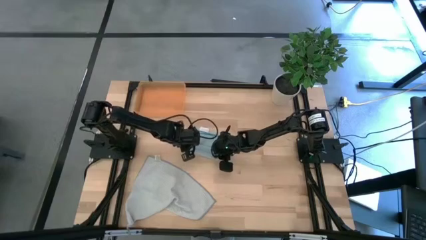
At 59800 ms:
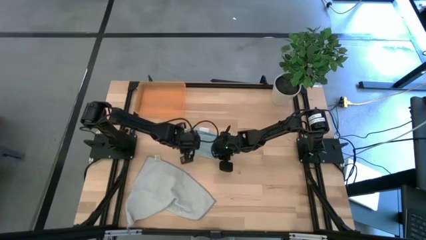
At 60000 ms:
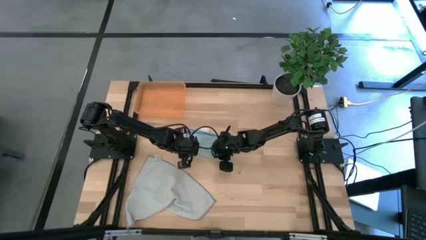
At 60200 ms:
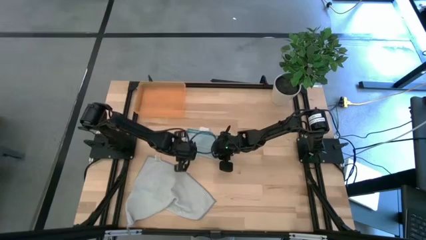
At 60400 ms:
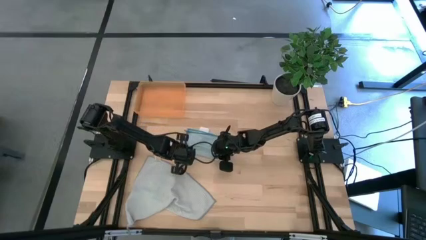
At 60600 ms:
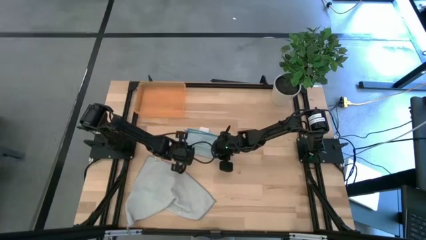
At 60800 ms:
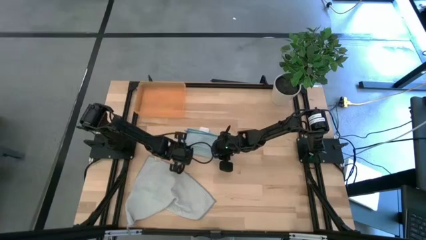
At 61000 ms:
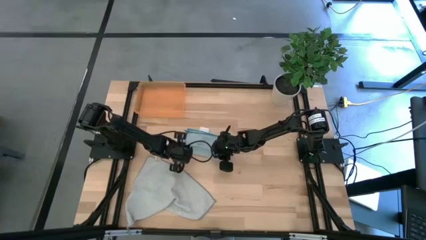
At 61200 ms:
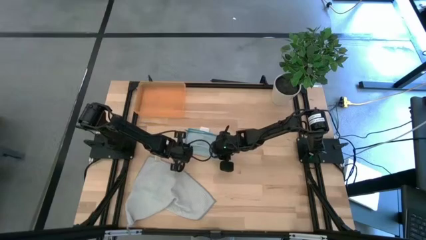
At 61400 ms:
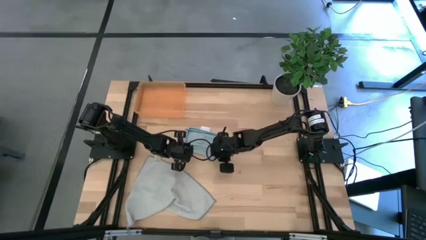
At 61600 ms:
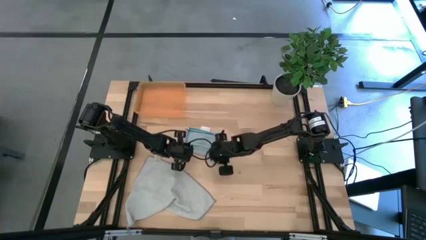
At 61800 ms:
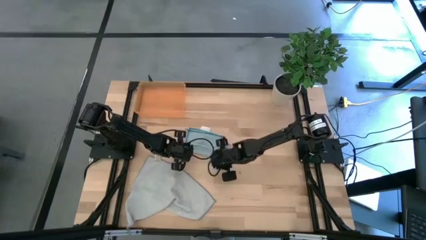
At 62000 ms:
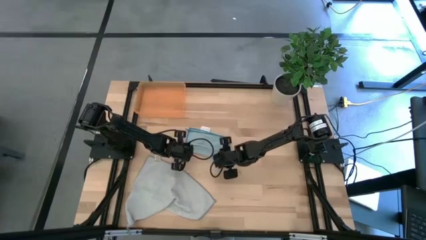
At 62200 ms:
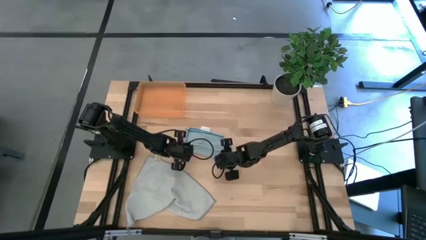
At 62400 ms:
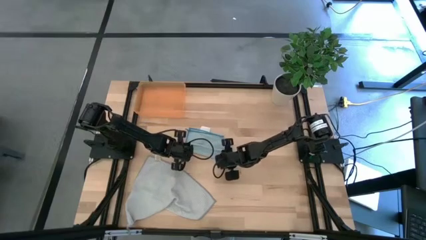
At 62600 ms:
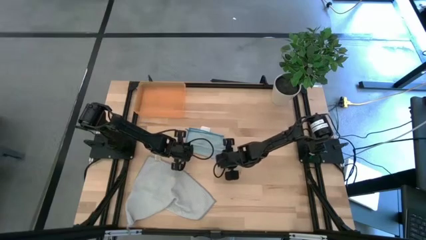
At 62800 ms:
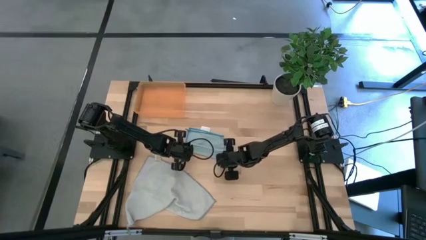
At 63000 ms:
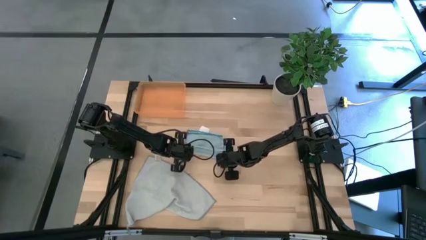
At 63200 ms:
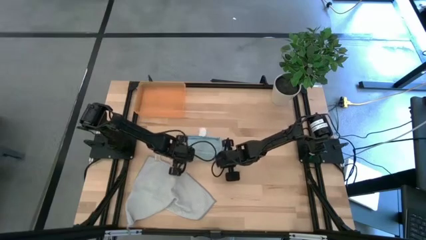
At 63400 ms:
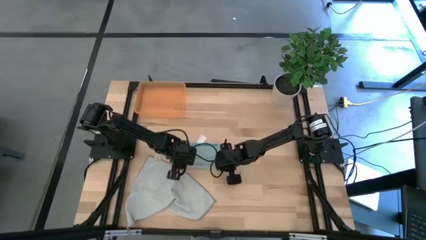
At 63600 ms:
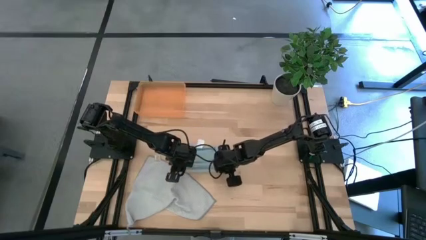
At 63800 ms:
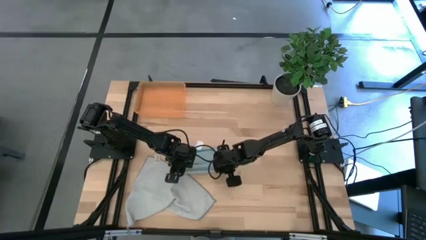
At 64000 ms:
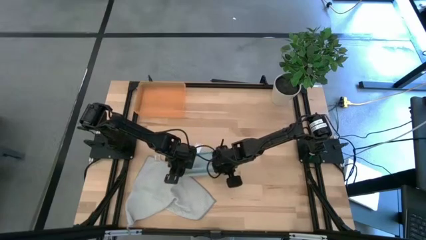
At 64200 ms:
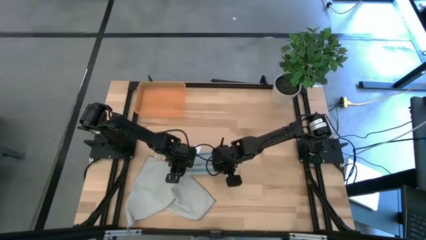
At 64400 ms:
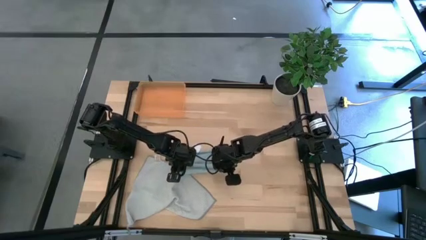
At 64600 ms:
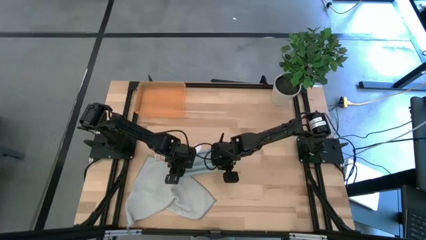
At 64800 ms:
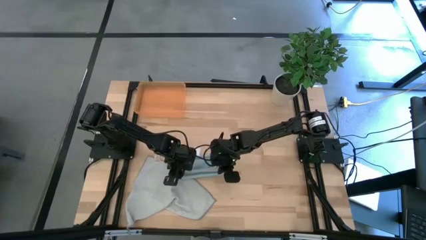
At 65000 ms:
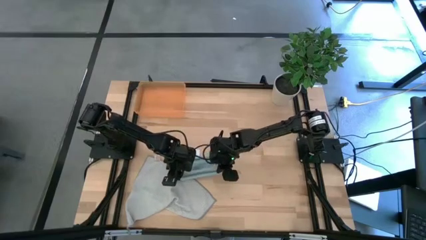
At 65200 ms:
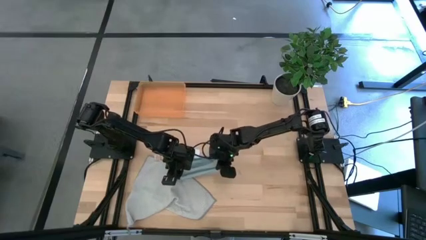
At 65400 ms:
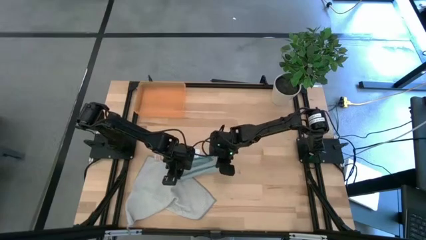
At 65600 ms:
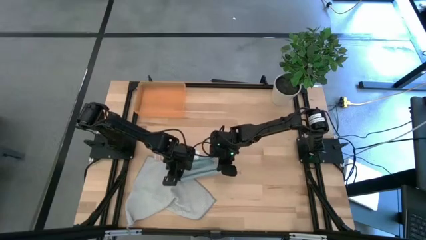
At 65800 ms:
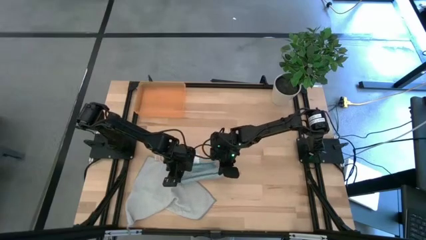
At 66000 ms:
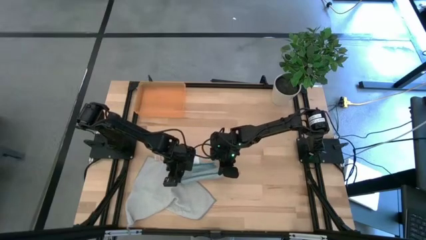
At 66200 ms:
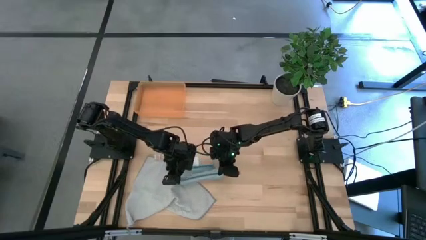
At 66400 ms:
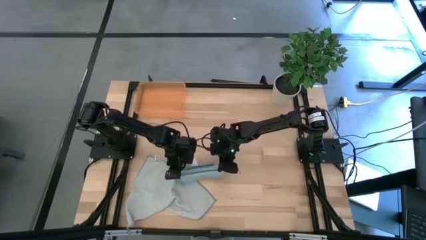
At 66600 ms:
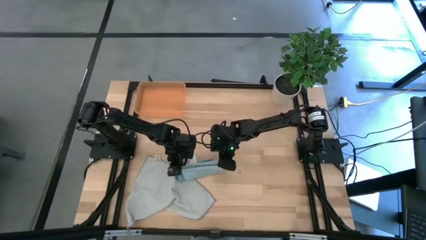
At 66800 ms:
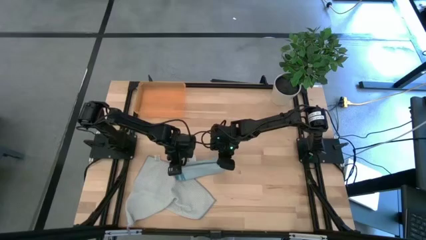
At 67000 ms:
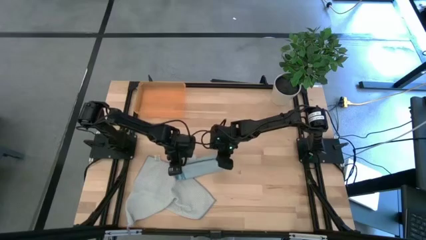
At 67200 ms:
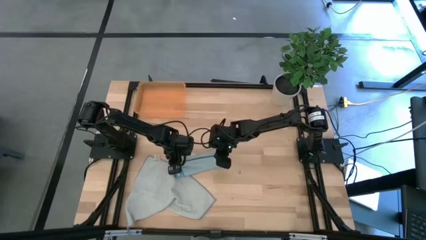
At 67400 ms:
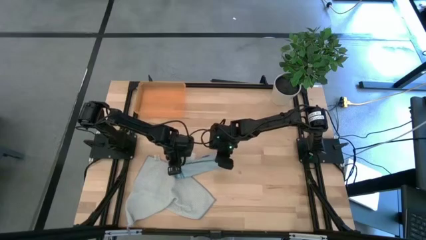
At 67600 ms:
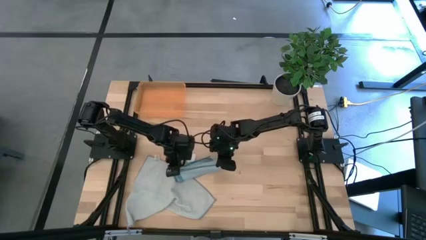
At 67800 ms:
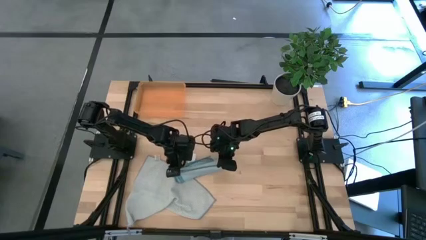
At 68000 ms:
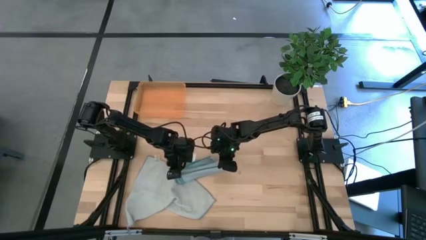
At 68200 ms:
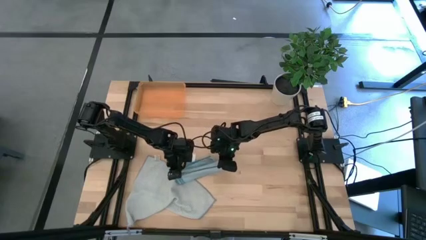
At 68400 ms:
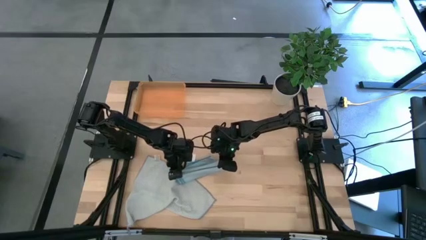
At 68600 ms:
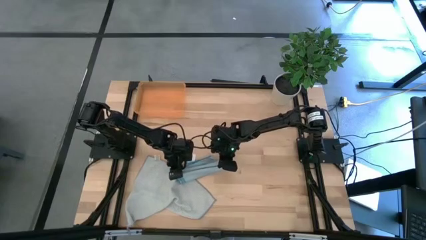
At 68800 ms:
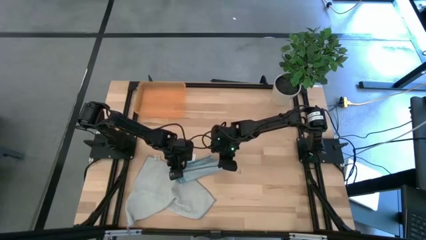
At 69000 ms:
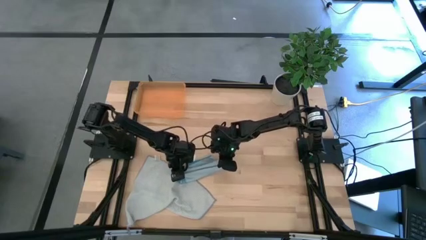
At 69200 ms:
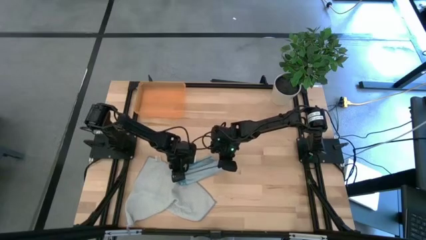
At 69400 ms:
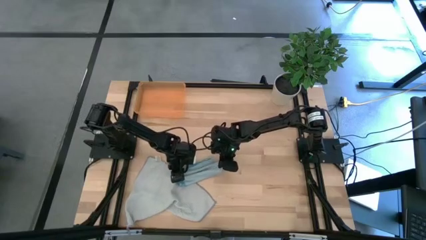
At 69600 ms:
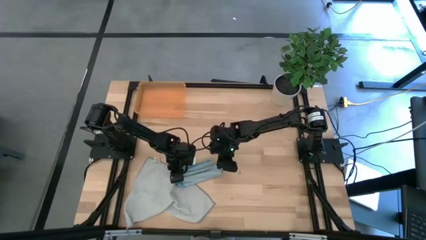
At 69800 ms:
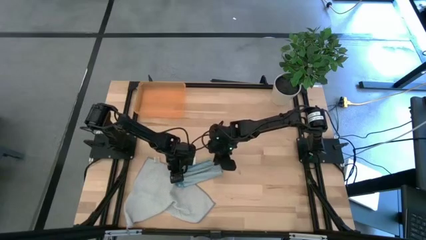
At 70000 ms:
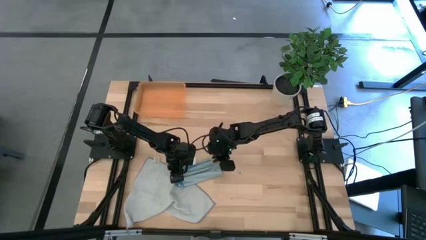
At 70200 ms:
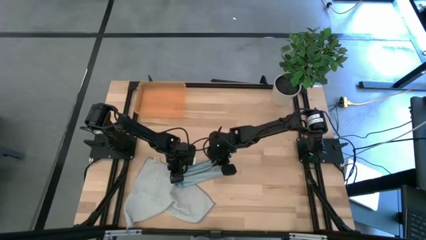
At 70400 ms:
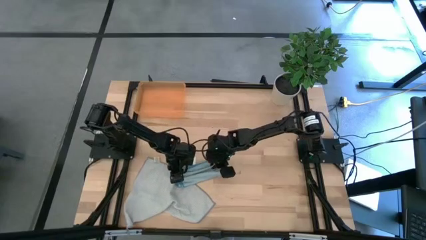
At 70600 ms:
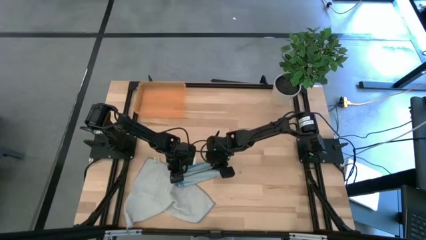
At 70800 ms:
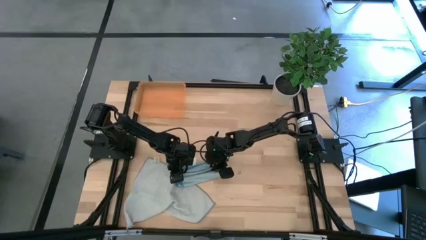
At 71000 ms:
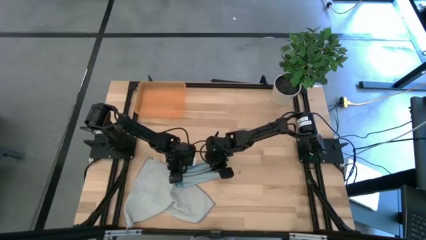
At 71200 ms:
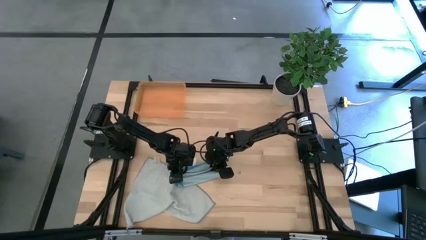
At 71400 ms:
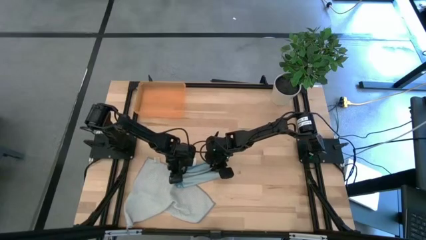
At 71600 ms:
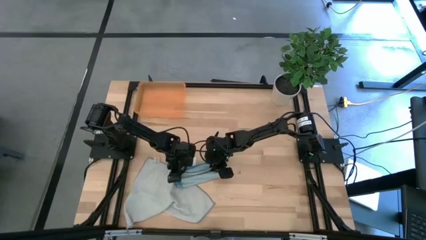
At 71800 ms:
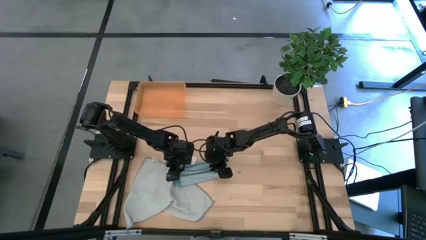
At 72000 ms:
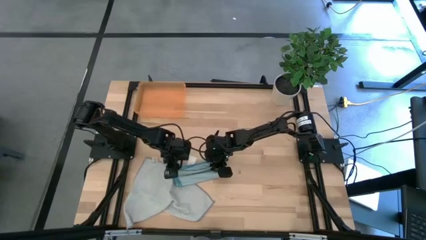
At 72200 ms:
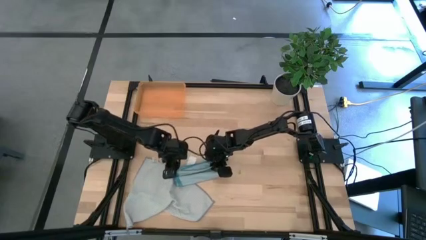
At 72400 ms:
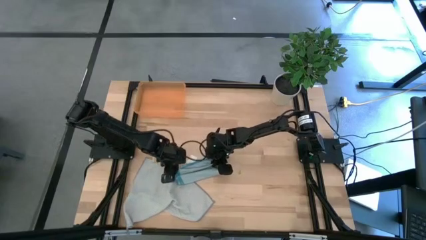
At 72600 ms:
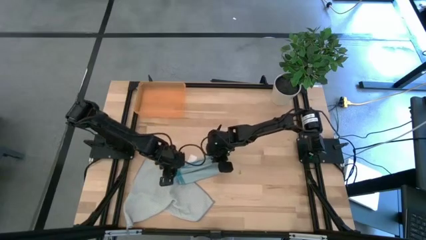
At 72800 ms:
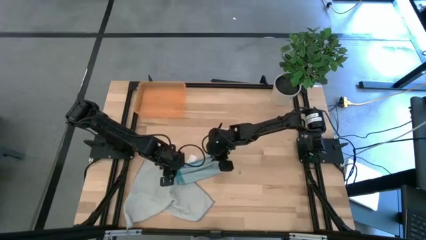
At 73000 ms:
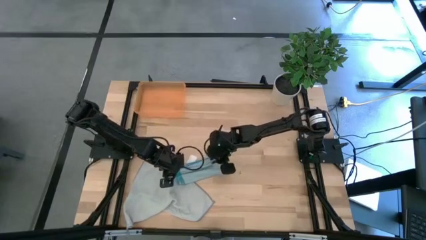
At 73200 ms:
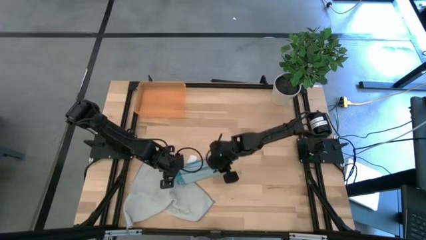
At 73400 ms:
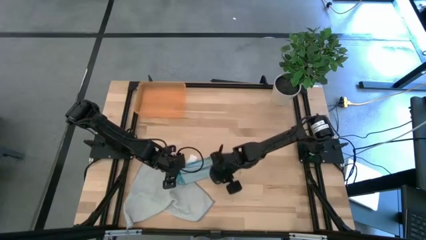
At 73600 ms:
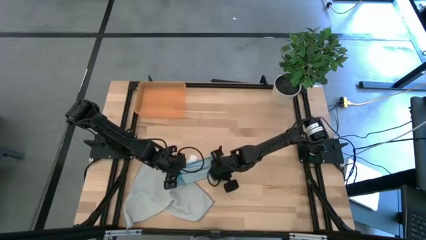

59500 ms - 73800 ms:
Task: Roll microfiber towels into tight, uniform cylinder then place into a basket
Roll the blue microfiber cloth
